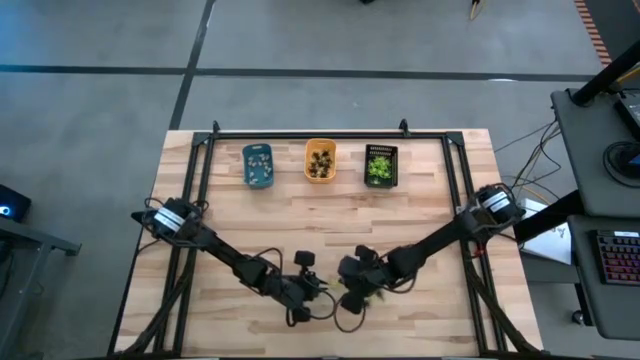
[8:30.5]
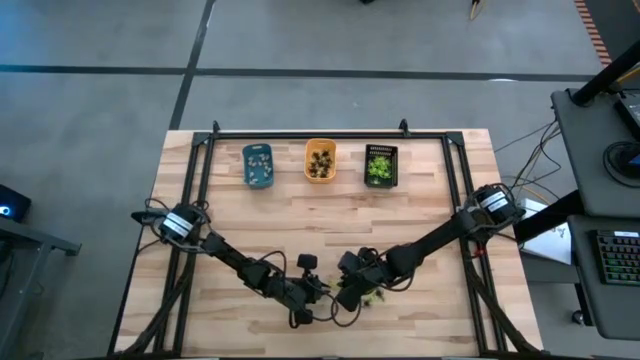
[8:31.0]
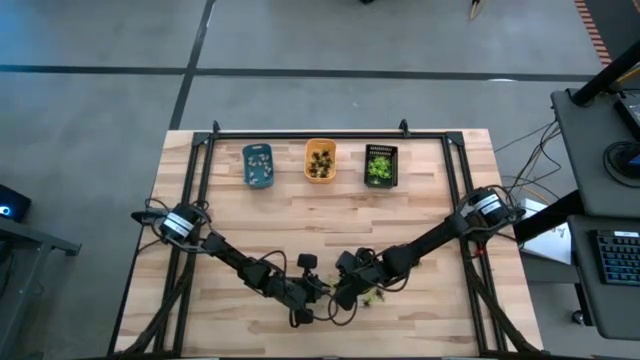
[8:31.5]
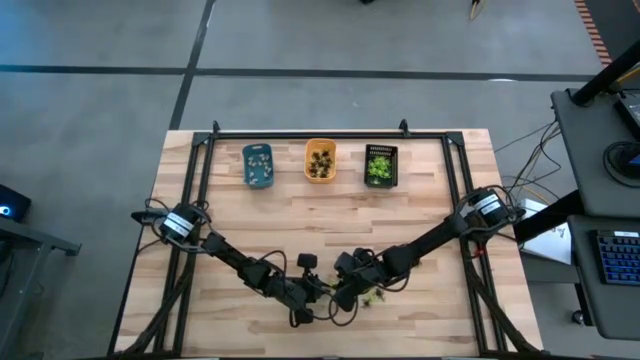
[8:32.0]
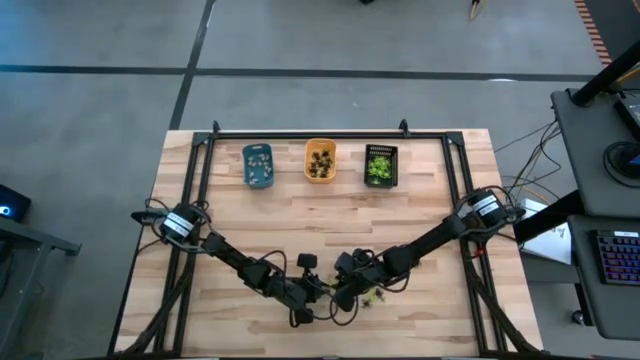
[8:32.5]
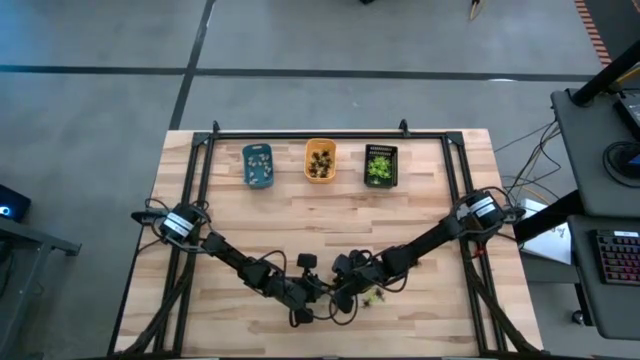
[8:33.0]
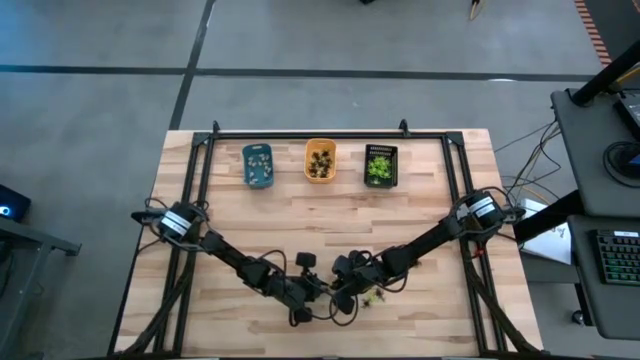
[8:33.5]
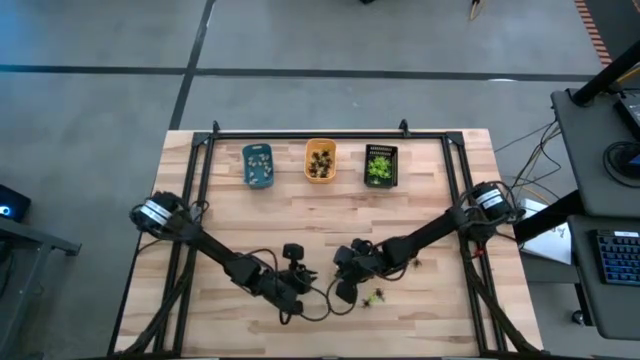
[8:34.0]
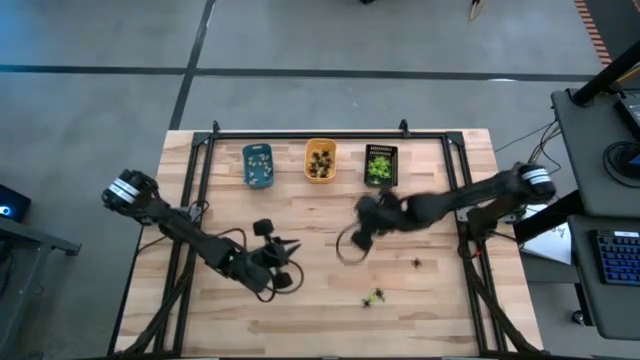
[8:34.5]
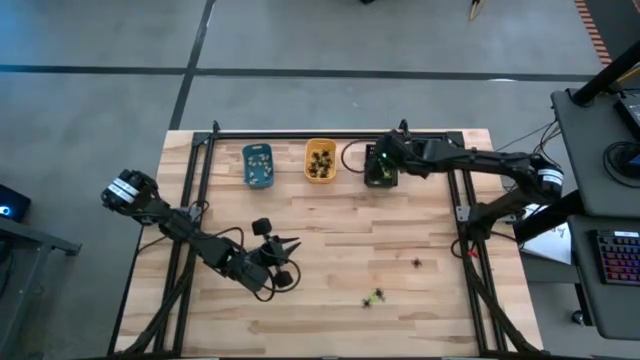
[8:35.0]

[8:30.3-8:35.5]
Task: Sort Halloween decoration
Put the green spider toy into the black bin

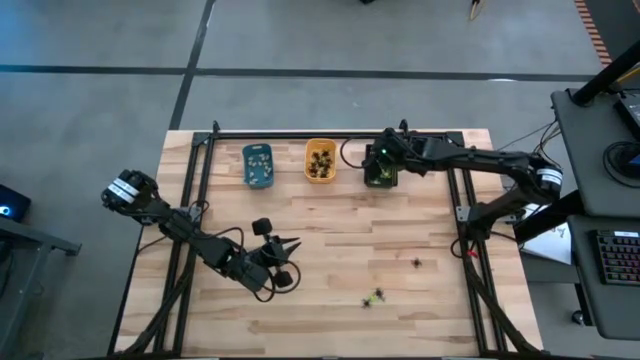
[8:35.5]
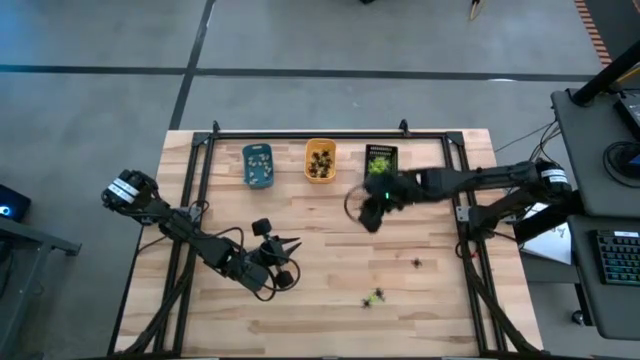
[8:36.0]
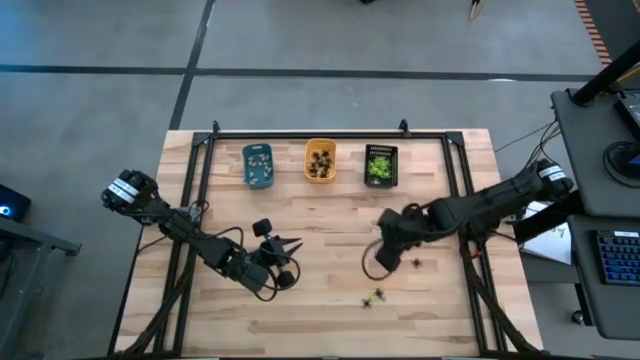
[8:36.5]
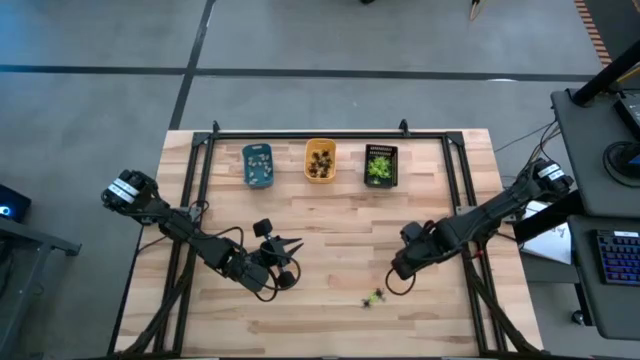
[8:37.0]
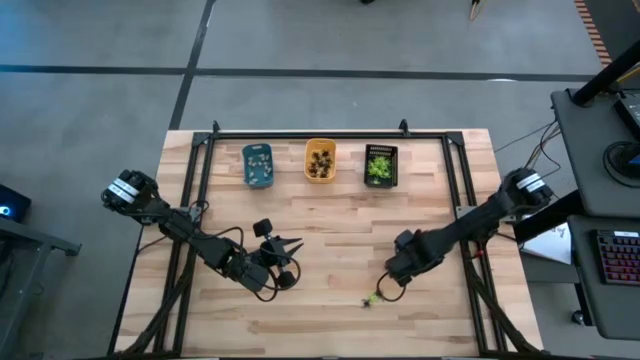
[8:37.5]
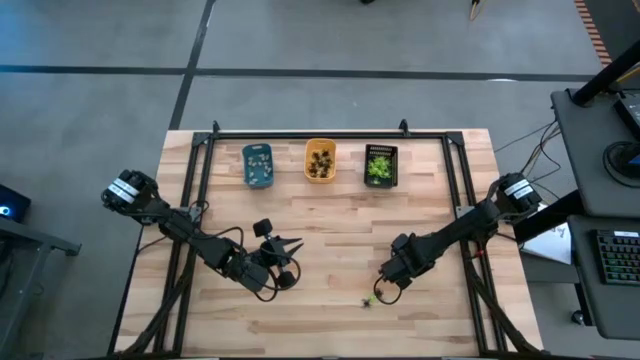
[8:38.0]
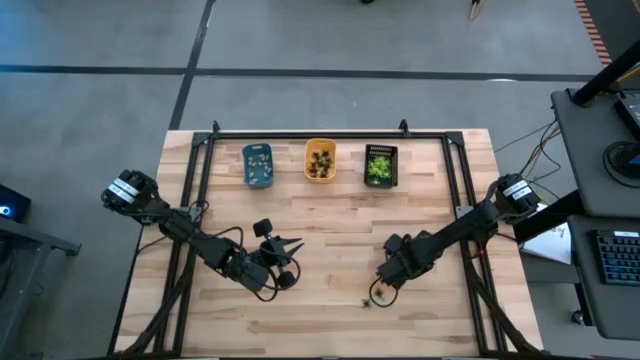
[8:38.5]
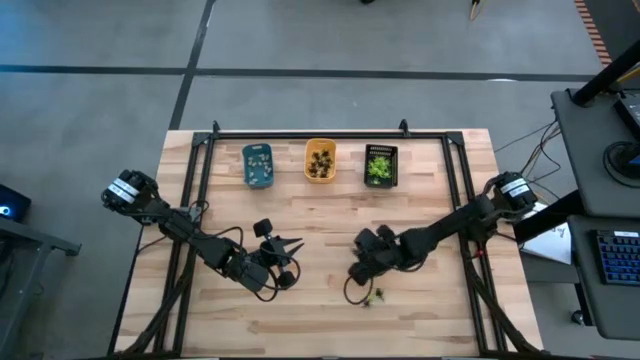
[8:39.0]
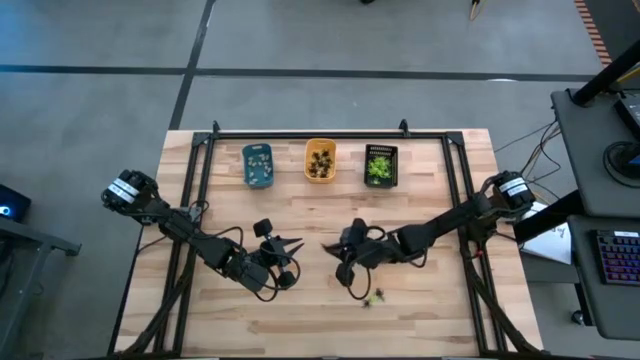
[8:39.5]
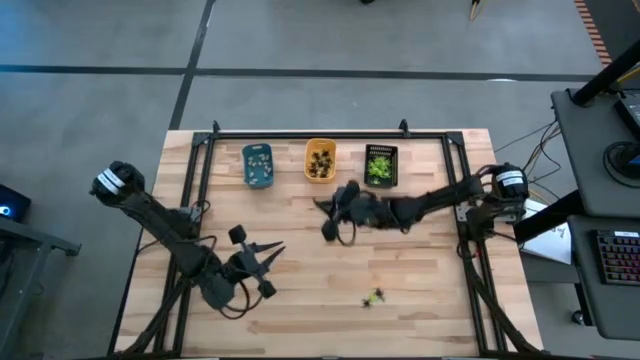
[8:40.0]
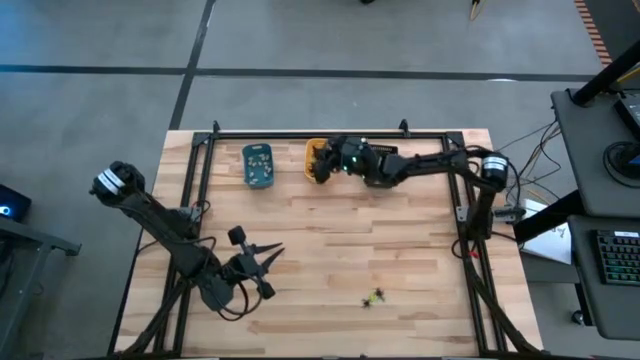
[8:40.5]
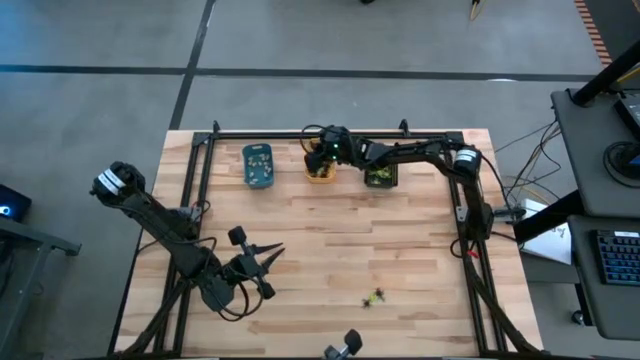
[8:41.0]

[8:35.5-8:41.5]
Put the black spider toy into the orange bin

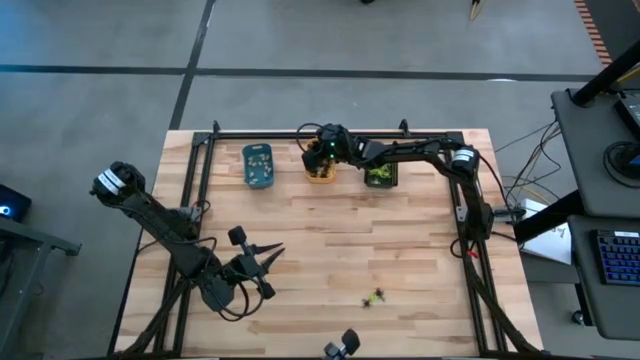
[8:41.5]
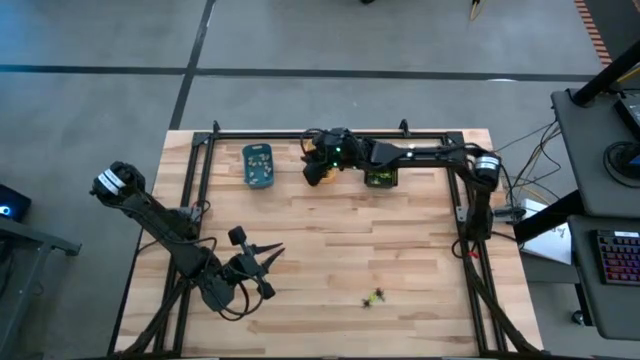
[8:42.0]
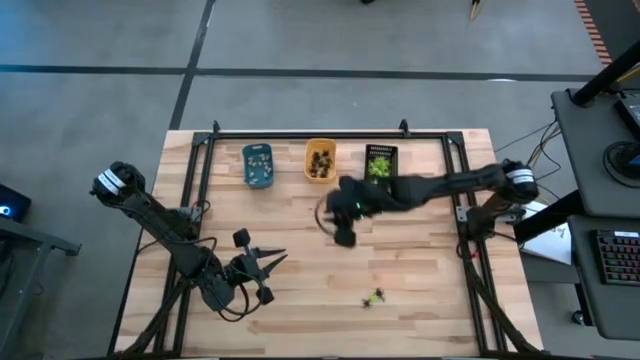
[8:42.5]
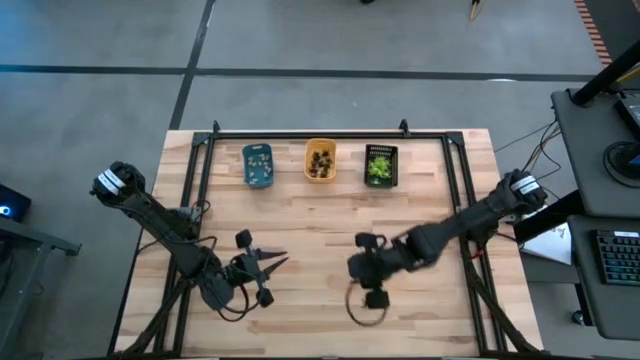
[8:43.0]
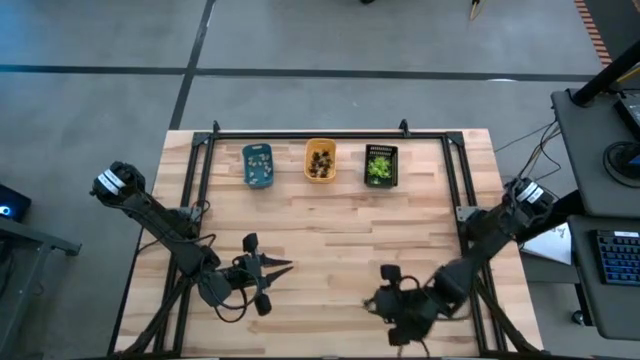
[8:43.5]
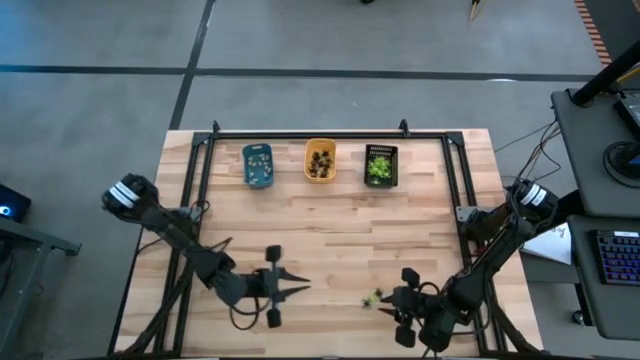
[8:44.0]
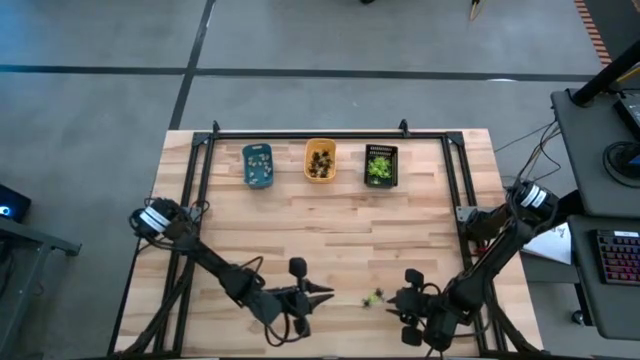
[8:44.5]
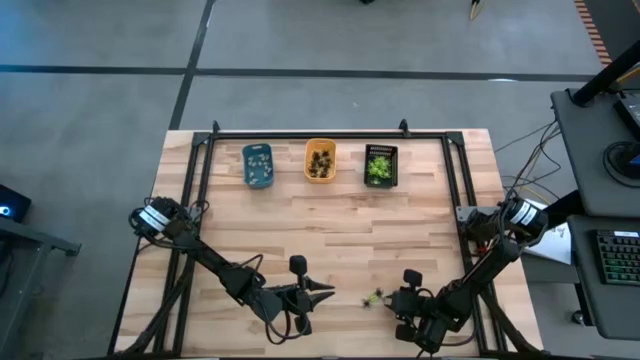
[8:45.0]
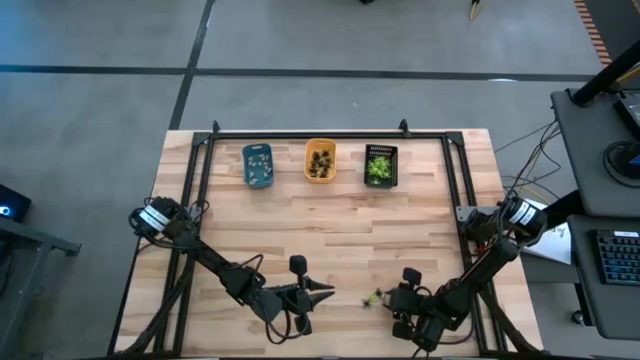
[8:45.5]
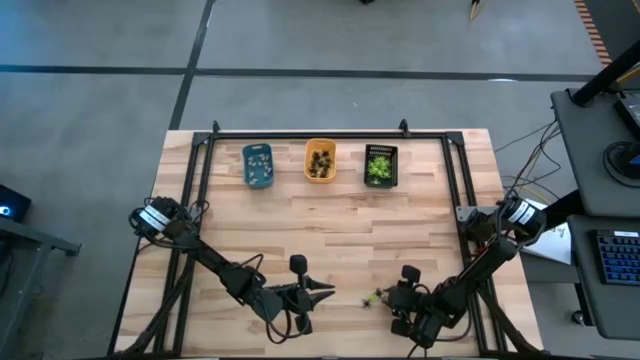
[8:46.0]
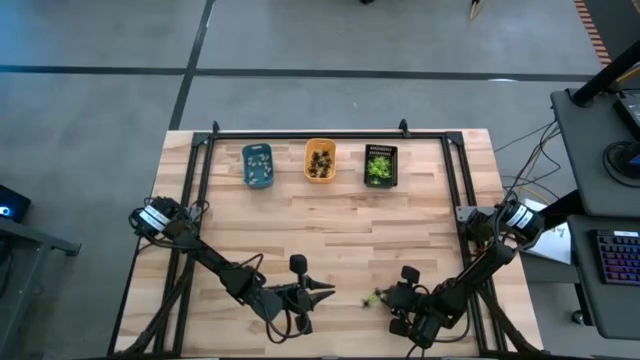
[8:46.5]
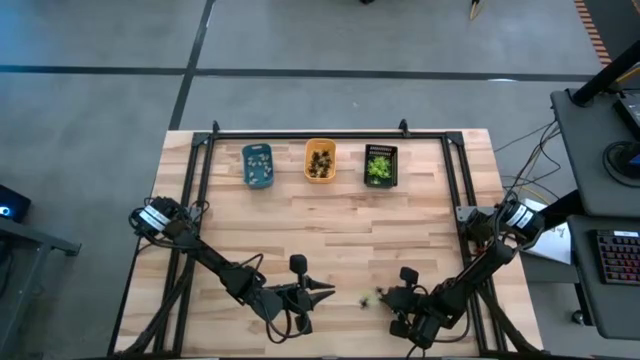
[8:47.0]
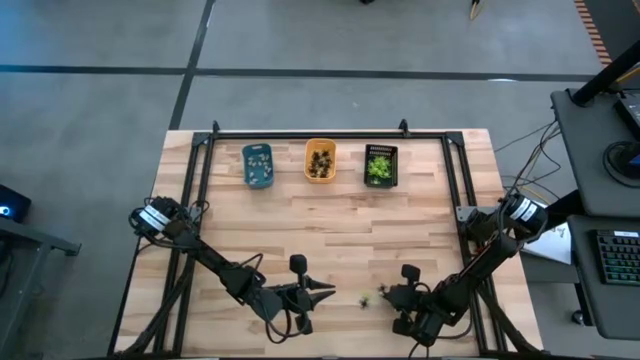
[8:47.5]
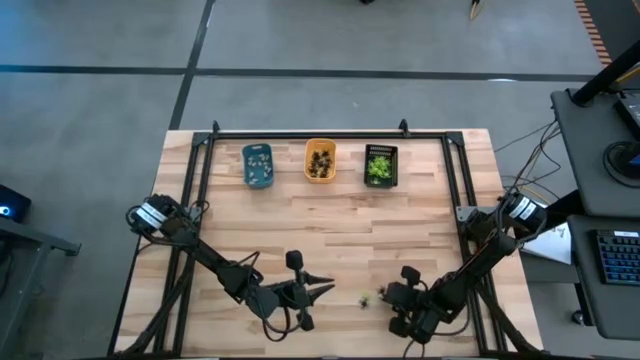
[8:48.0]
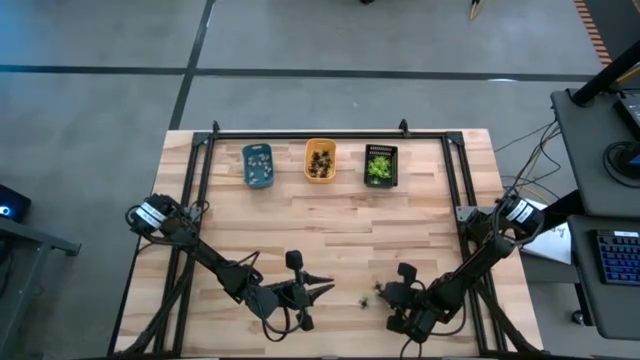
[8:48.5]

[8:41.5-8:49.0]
Put the white skull toy into the blue bin

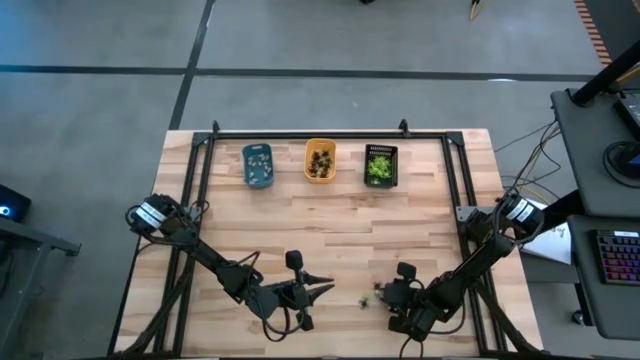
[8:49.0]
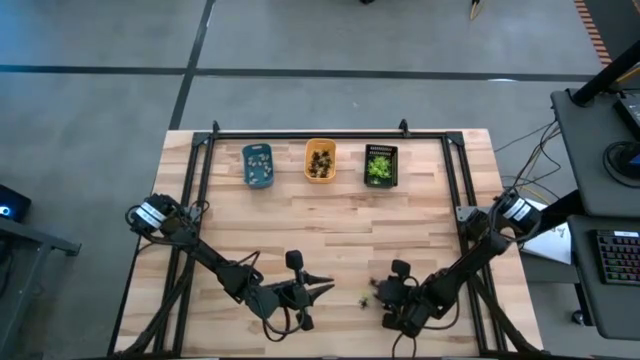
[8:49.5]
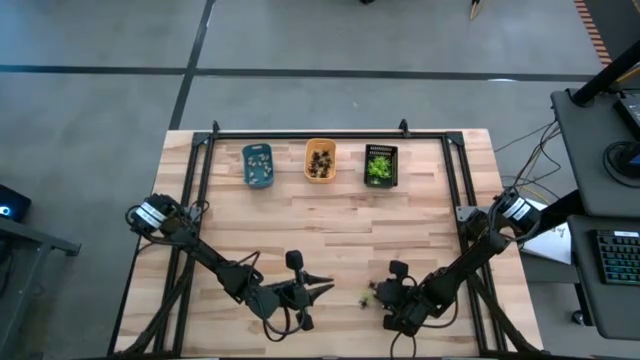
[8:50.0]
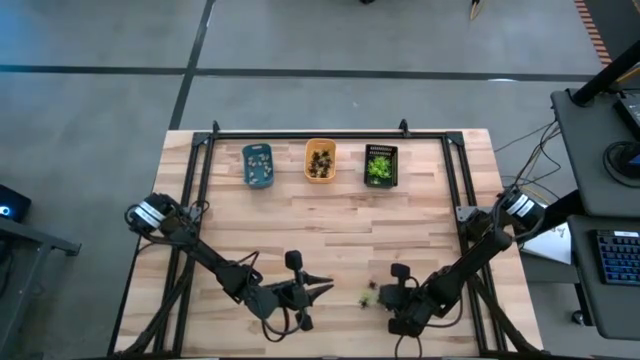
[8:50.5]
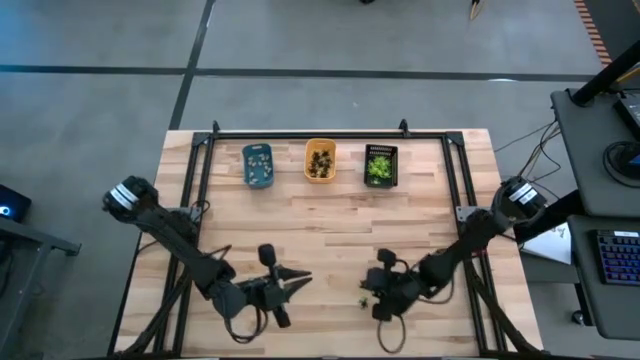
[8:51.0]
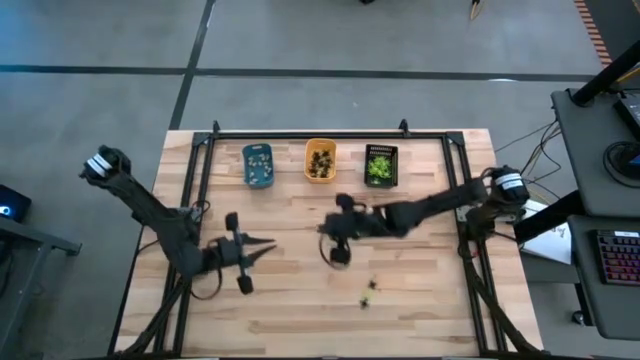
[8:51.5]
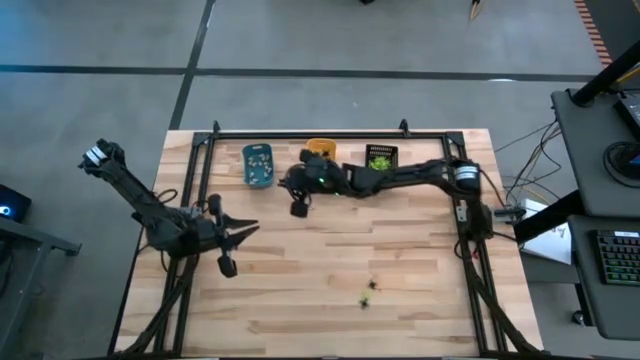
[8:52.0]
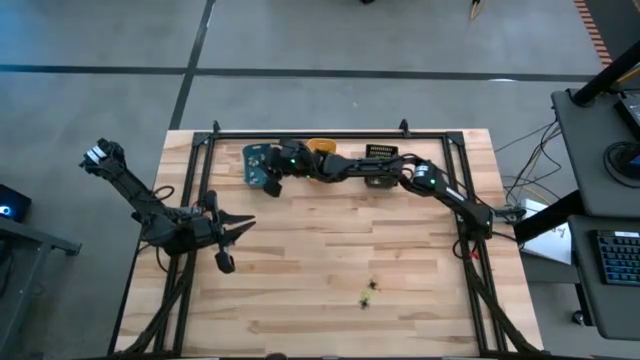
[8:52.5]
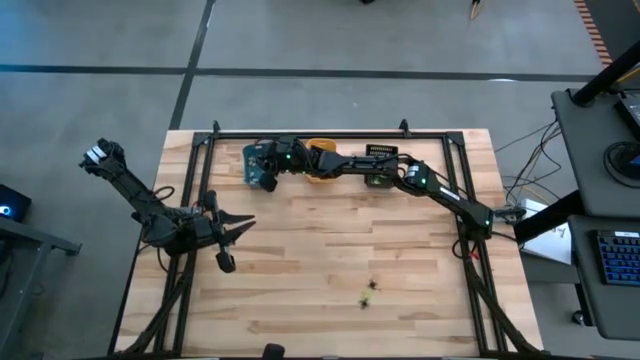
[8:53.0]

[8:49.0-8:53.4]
Put the white skull toy into the blue bin
